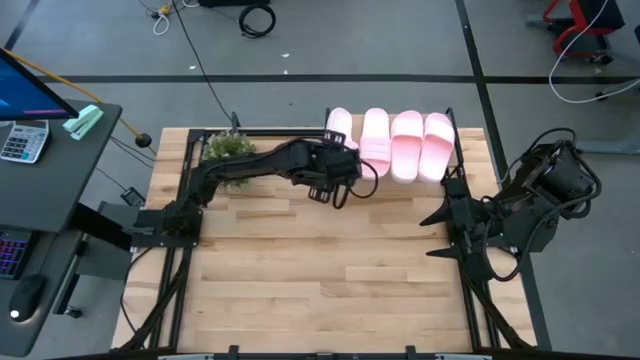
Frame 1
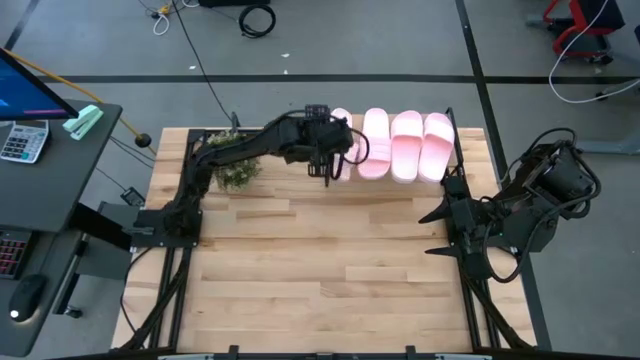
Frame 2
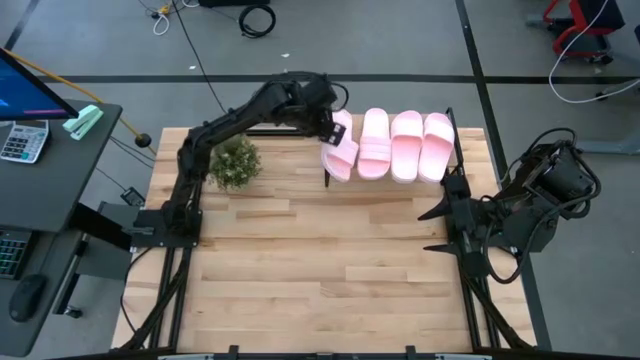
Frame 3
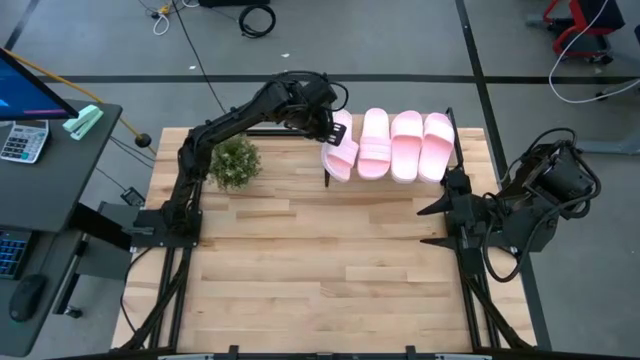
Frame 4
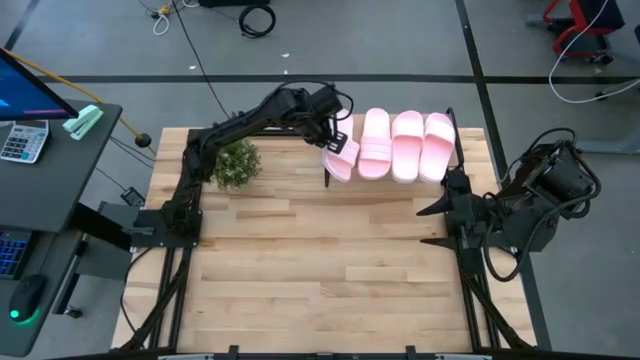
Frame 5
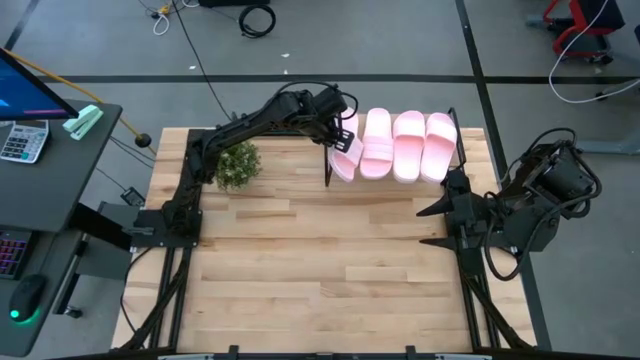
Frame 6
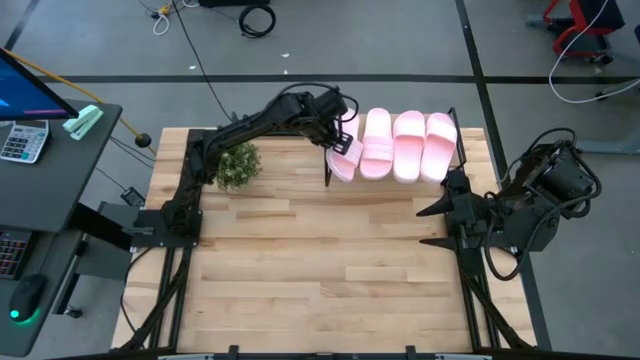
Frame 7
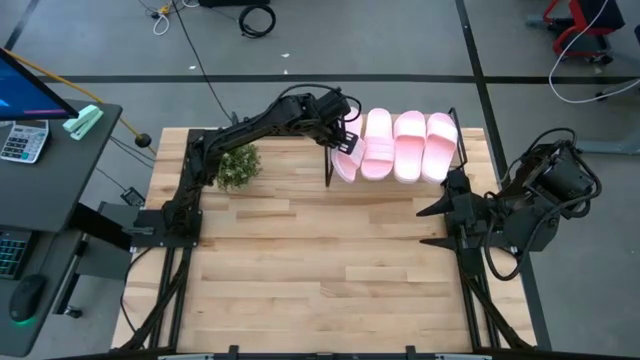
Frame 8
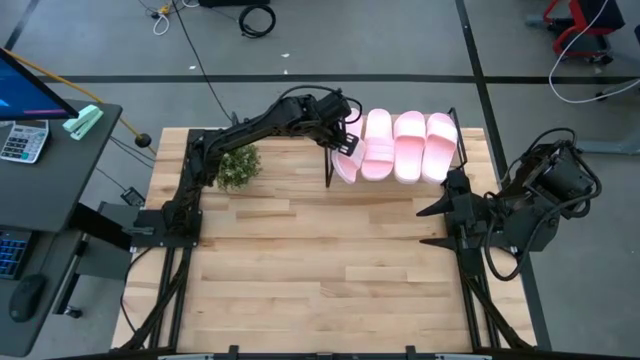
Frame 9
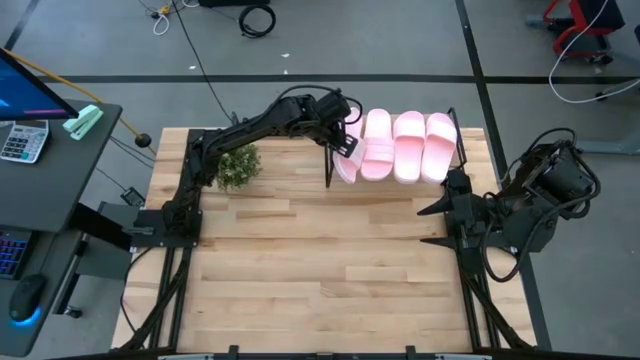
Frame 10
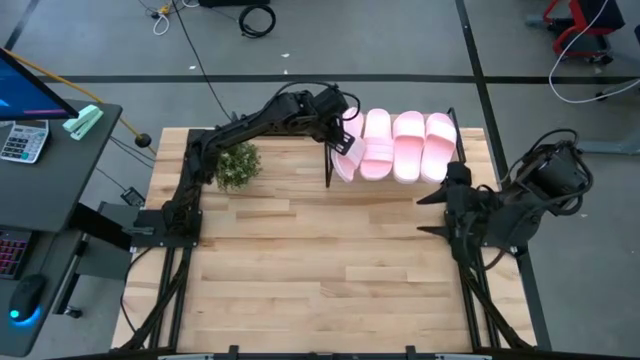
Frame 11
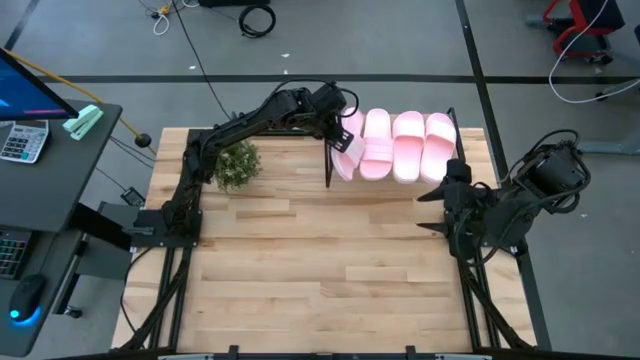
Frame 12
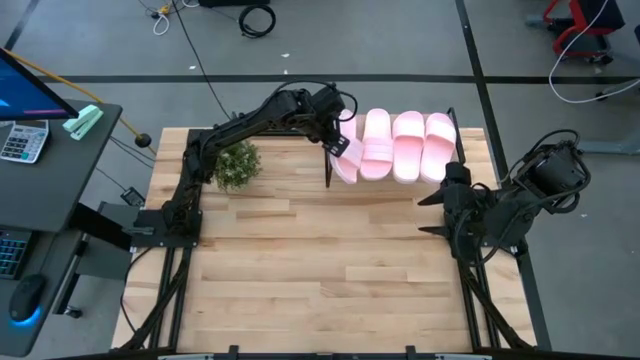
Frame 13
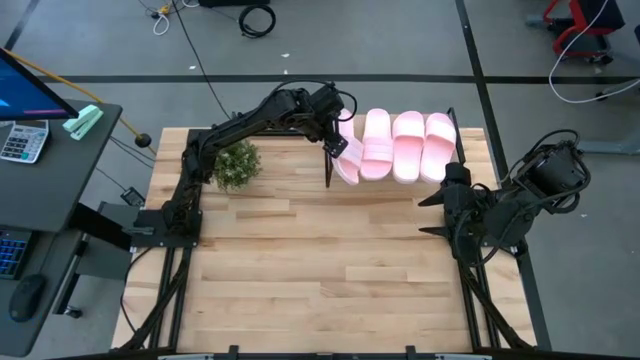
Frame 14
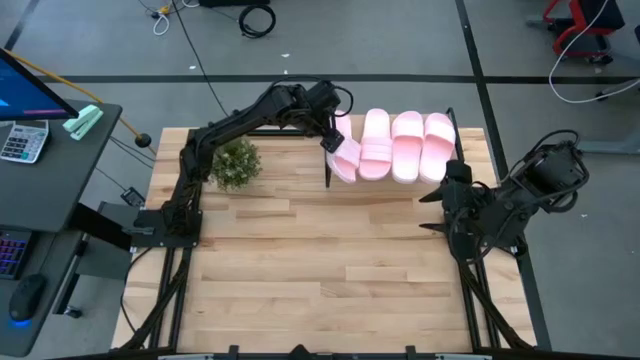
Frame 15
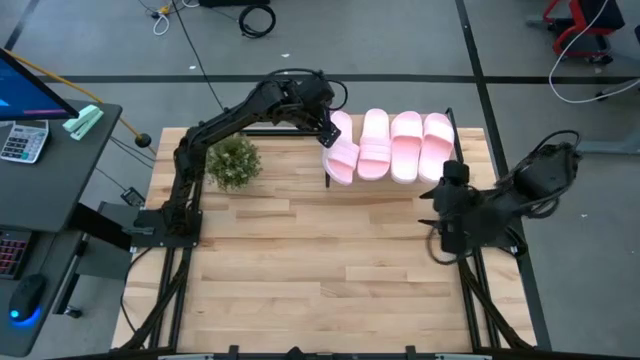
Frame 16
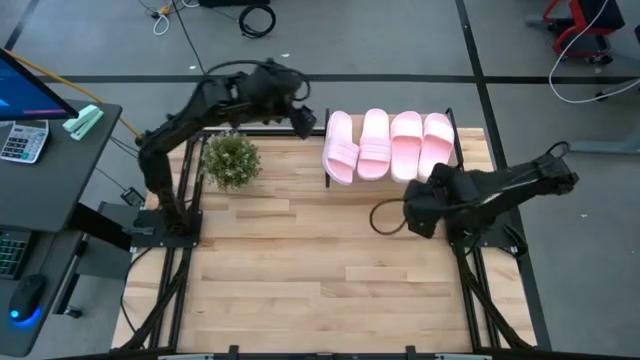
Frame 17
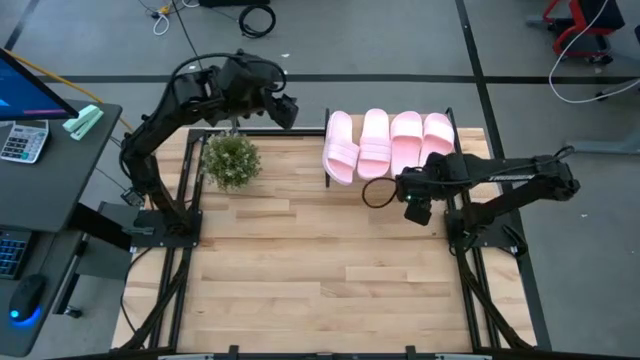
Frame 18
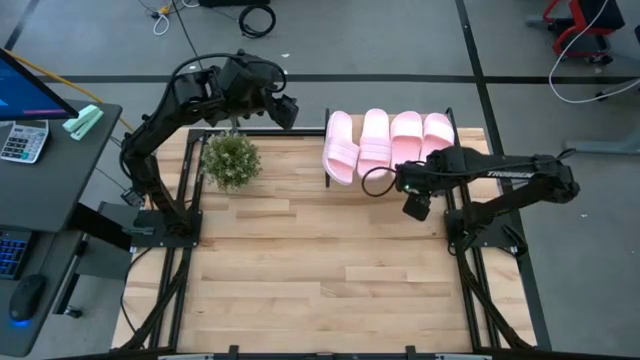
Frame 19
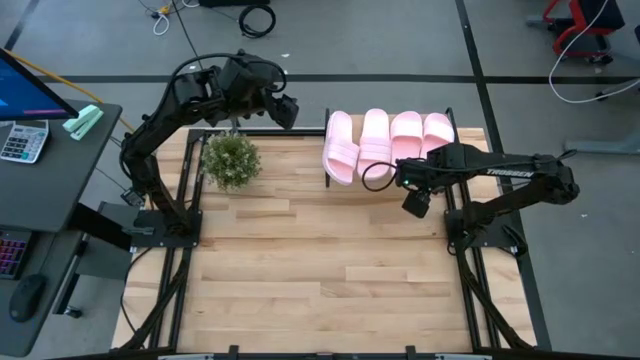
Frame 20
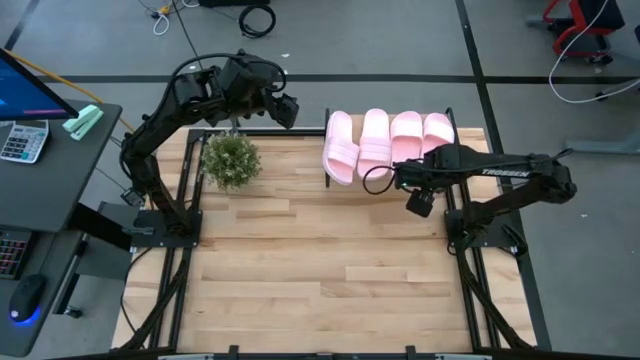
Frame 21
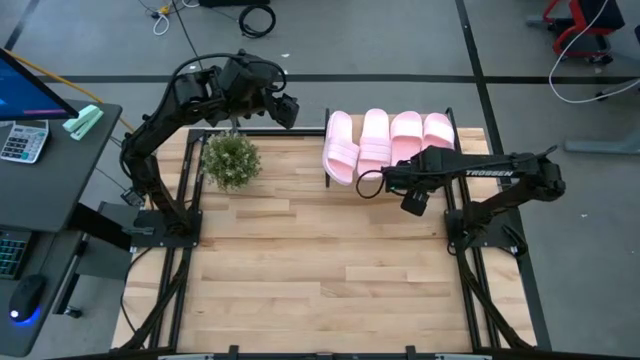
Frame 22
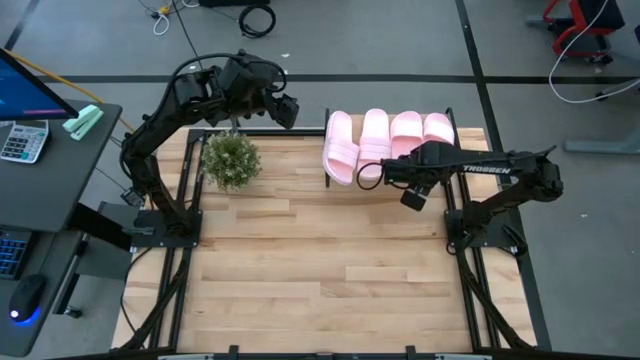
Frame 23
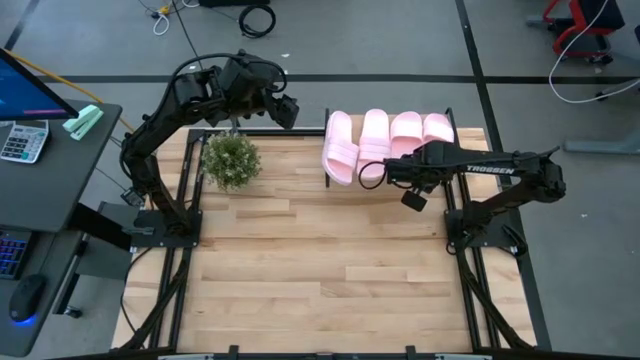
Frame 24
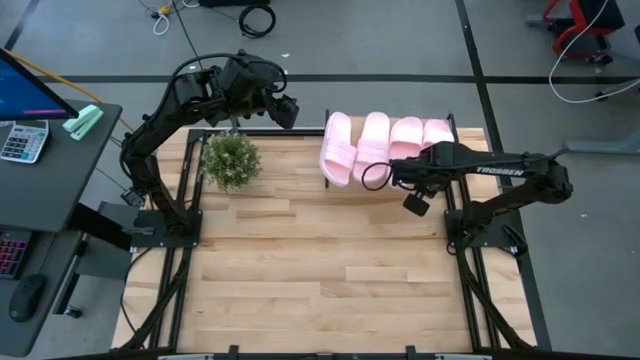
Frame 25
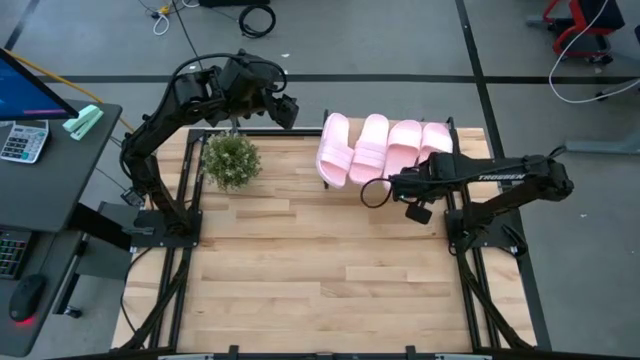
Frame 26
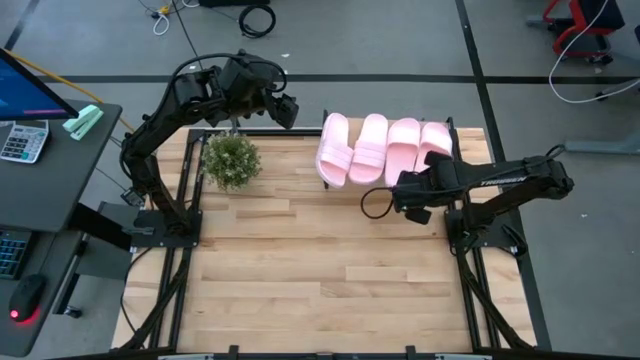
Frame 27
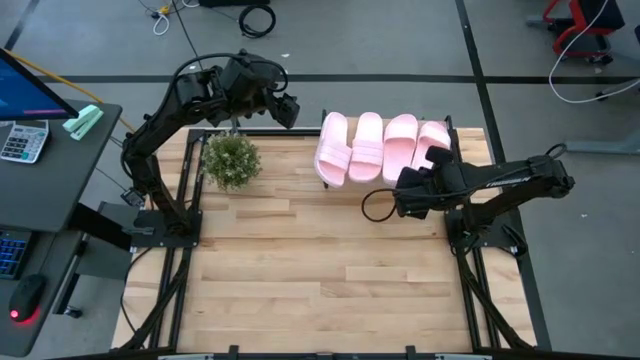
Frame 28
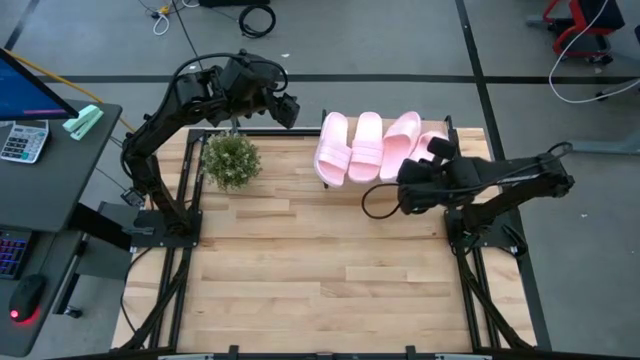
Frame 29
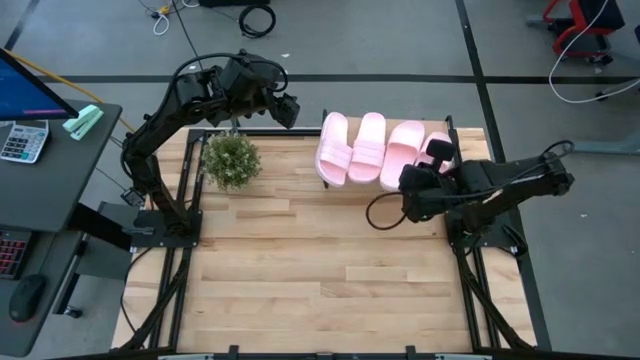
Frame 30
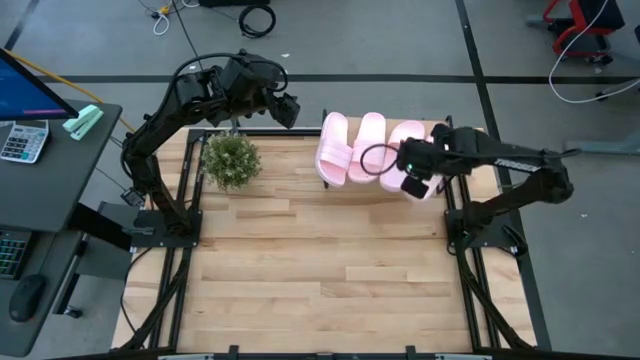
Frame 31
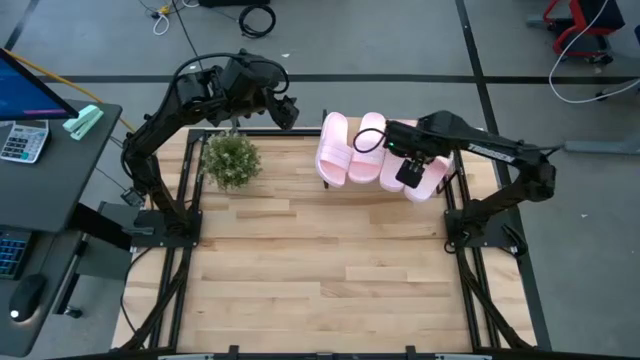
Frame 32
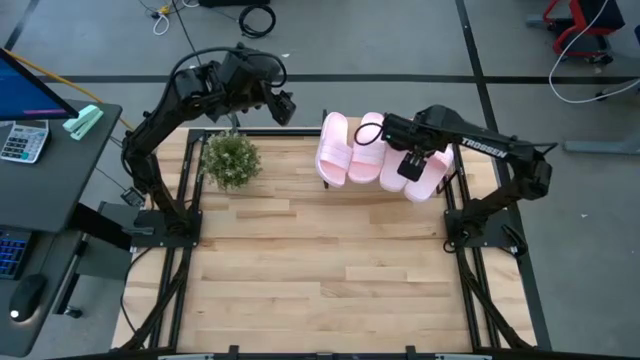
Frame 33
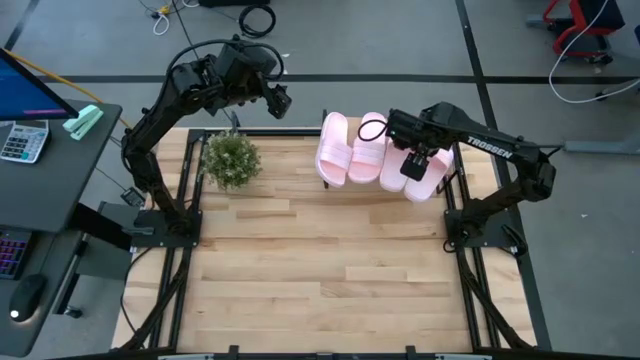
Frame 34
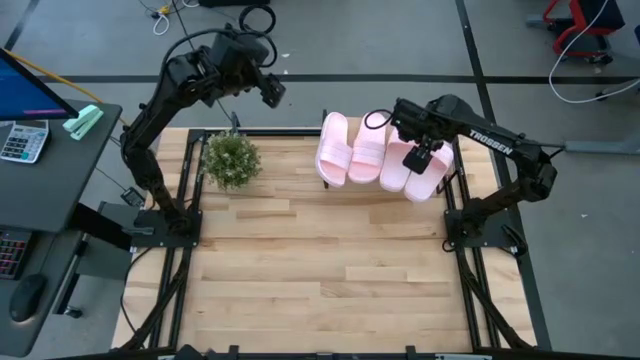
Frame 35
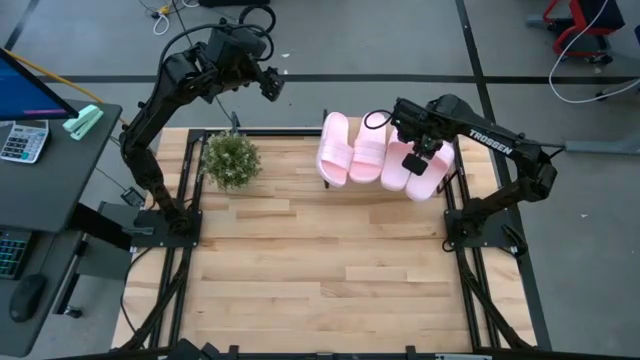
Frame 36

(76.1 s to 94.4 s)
Task: Pick and place slides into the shelf
Adjust the slides on the shelf
